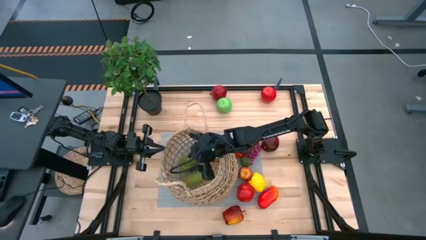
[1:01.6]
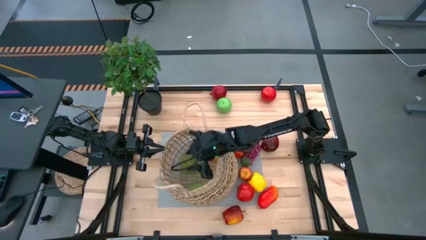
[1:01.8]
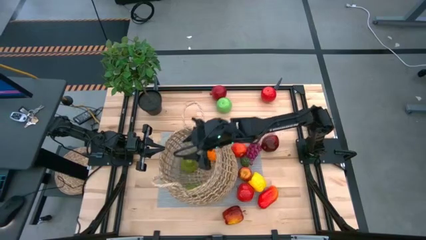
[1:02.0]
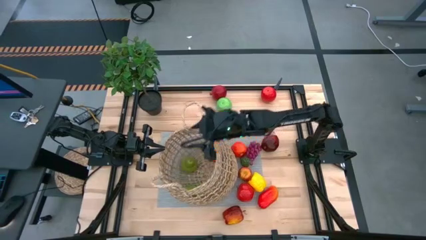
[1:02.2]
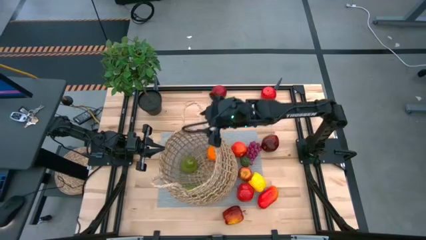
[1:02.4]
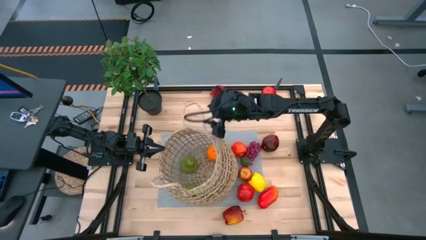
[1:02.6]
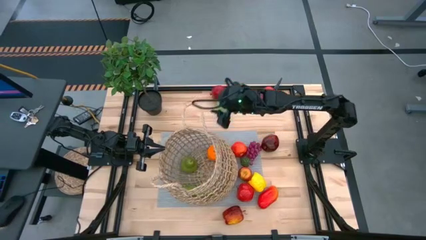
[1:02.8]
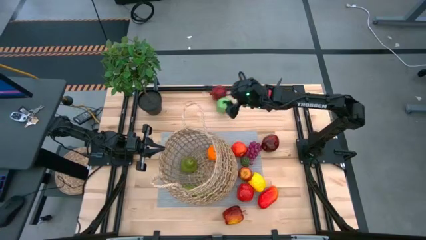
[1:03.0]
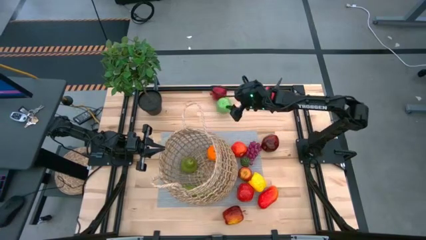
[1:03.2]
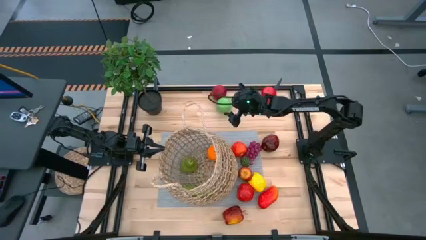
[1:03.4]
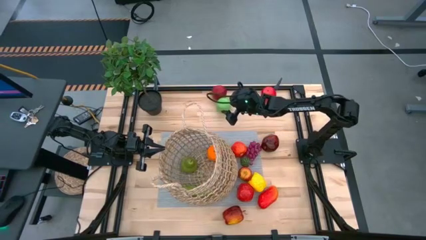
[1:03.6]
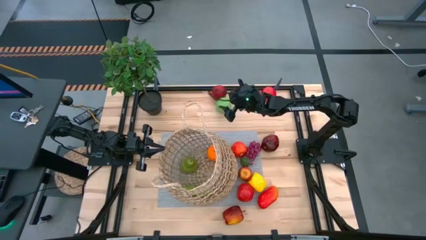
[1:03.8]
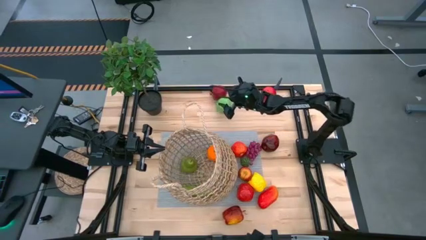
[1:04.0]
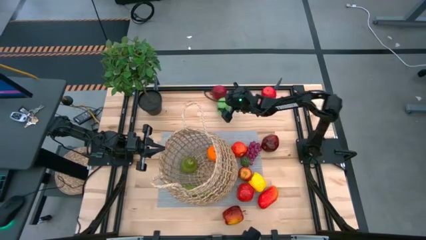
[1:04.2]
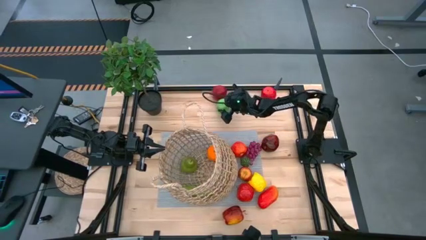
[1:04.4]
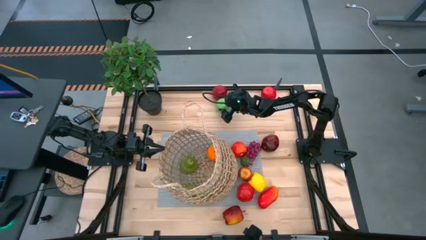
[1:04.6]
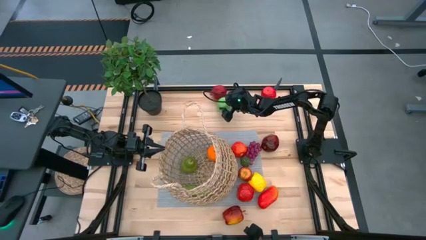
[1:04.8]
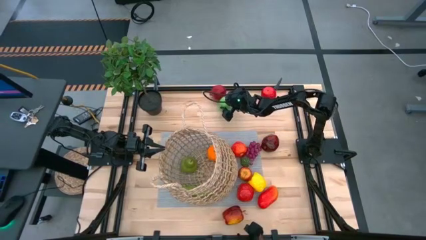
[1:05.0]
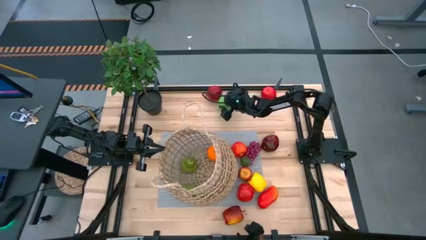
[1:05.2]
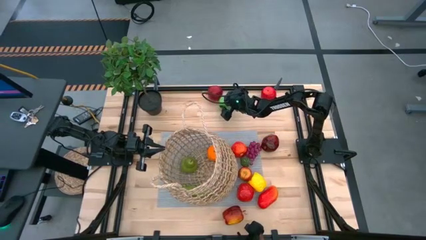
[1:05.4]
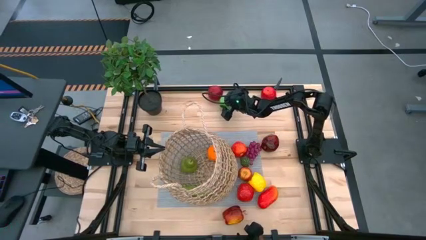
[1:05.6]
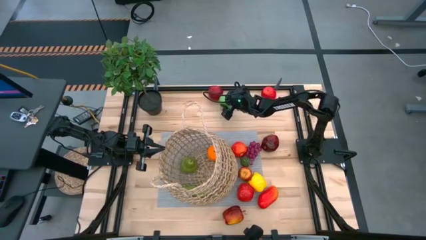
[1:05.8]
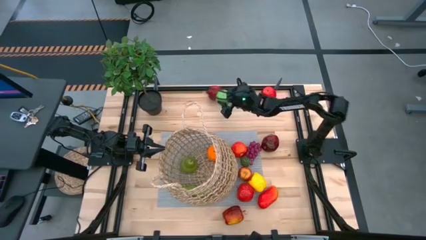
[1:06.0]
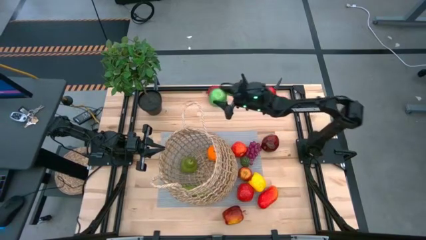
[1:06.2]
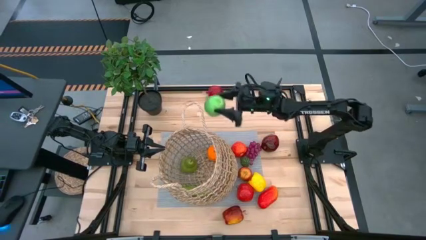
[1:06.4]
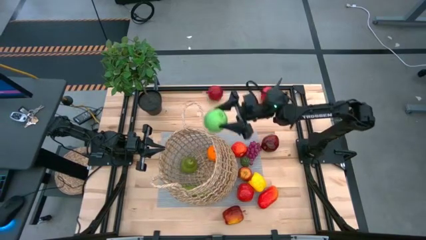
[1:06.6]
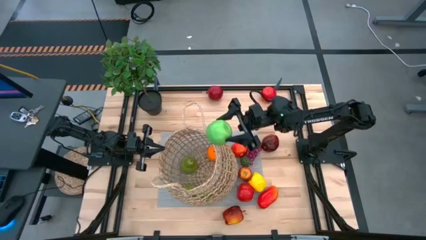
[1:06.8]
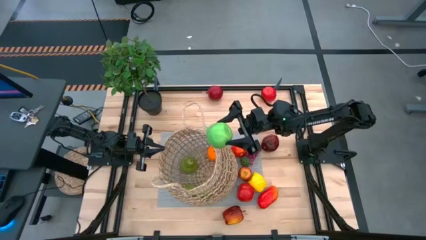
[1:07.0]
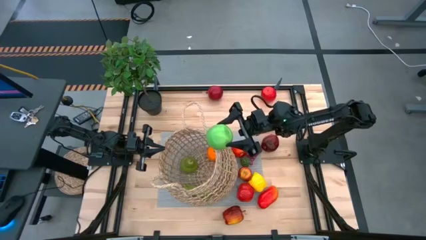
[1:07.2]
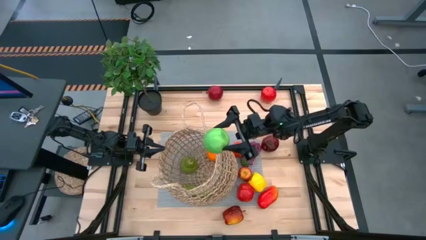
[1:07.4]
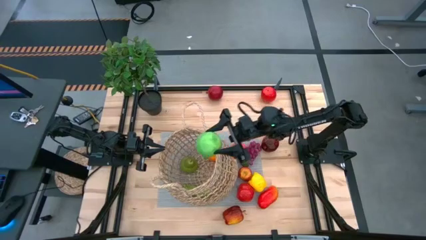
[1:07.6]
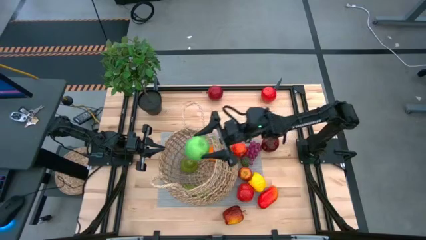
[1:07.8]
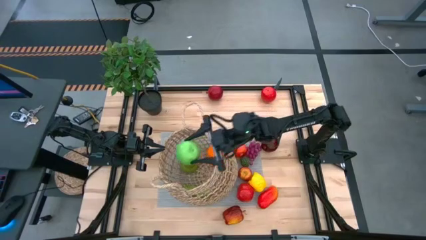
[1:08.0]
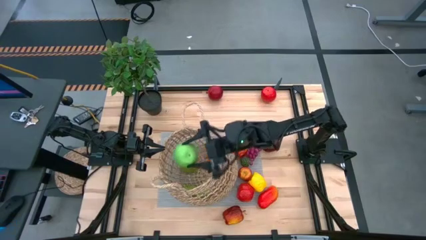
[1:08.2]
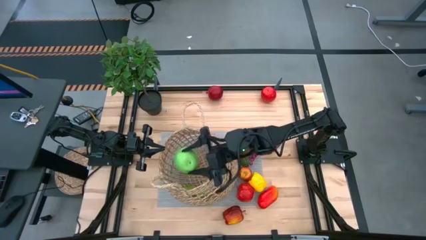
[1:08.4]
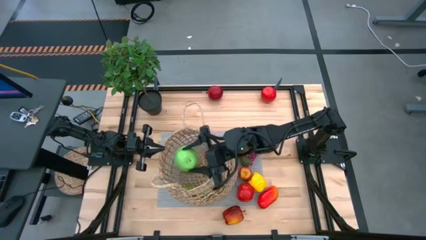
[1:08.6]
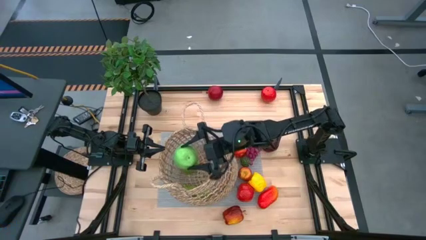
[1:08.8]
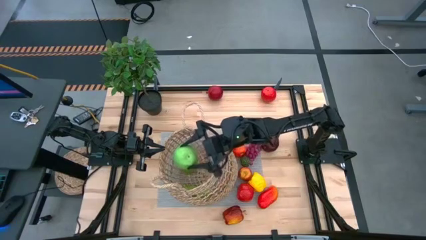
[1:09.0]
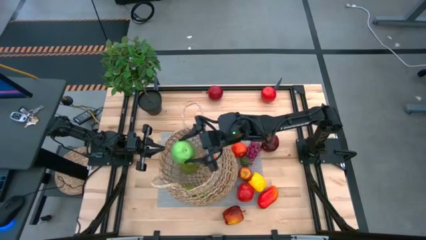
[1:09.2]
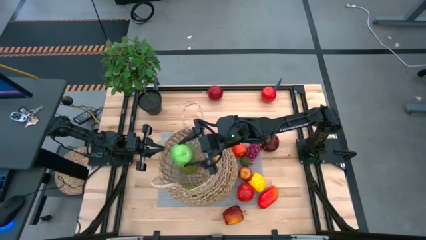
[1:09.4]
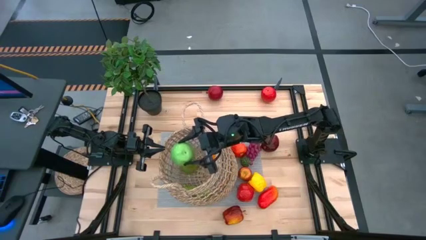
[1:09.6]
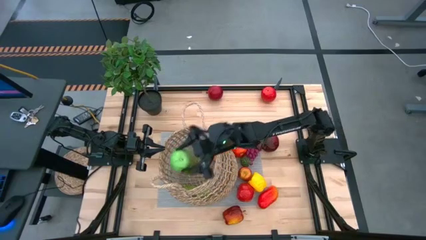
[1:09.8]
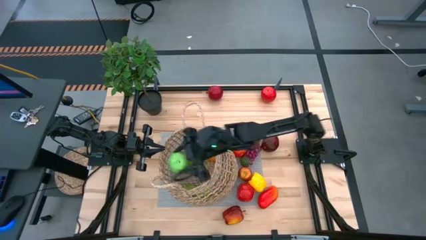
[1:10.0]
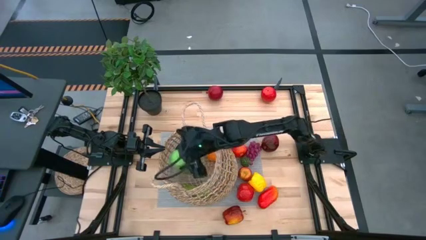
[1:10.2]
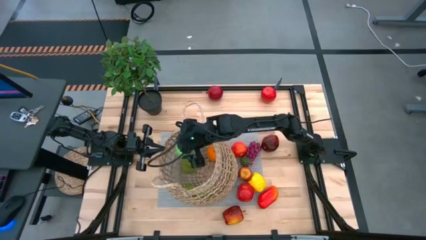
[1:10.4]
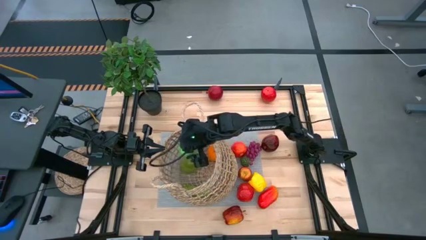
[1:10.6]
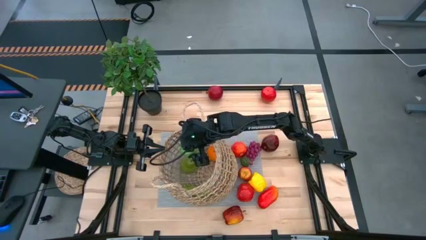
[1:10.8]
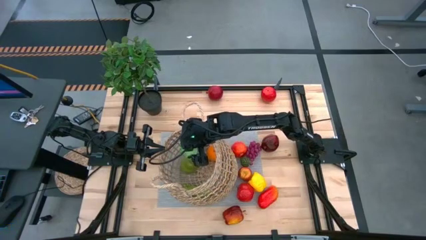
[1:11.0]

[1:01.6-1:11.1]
Task: Build produce basket
Put the green apple into the brown basket

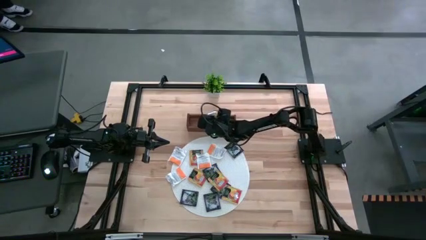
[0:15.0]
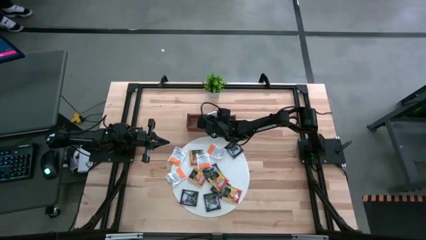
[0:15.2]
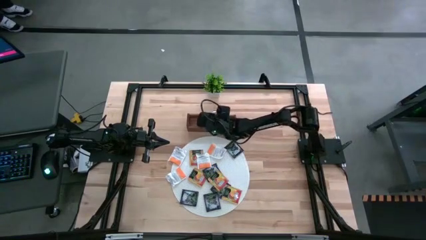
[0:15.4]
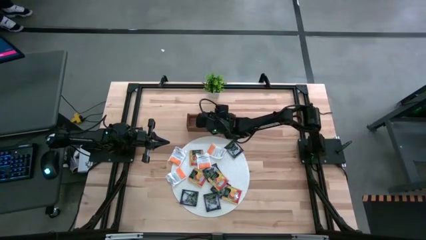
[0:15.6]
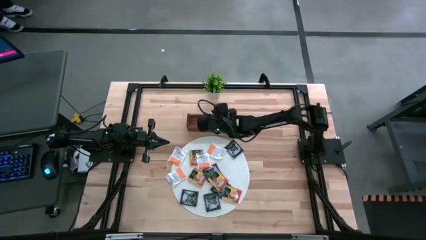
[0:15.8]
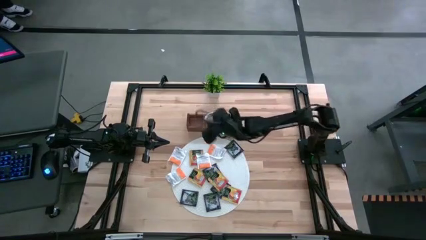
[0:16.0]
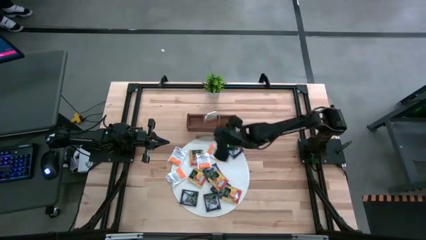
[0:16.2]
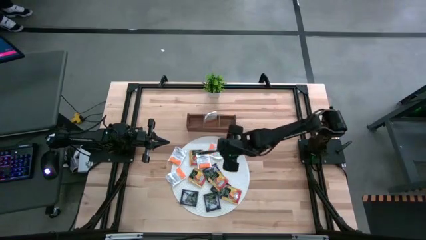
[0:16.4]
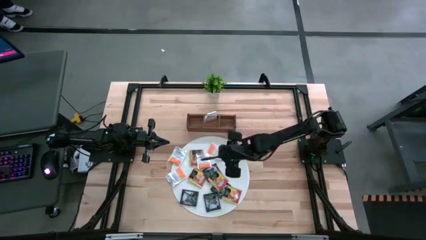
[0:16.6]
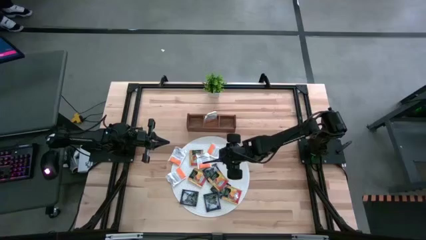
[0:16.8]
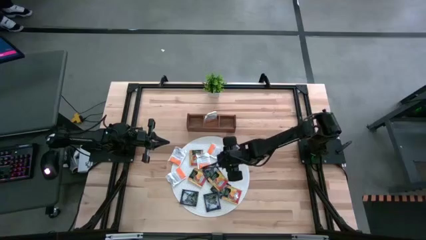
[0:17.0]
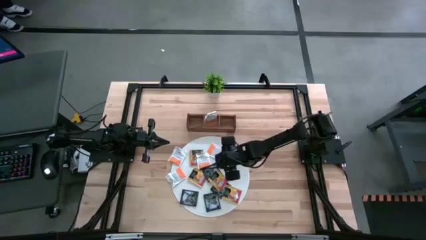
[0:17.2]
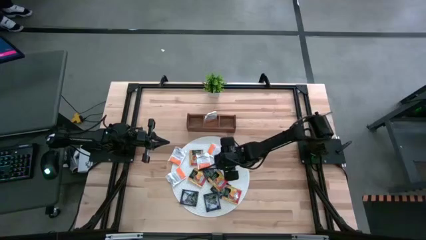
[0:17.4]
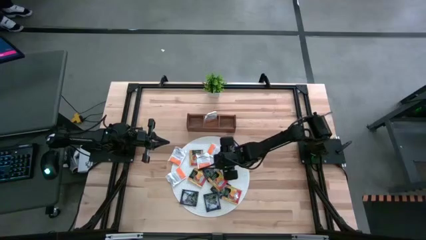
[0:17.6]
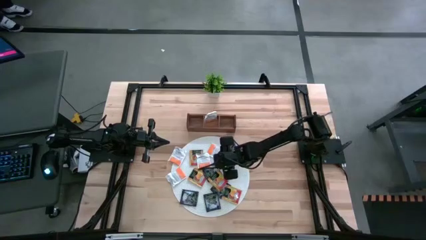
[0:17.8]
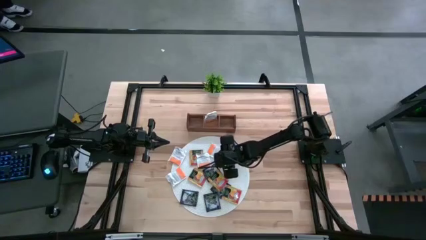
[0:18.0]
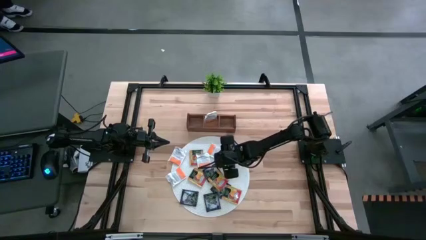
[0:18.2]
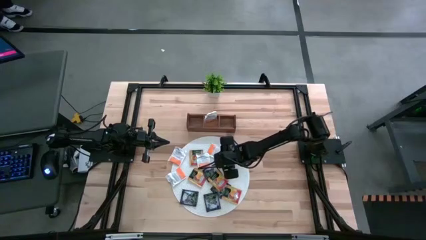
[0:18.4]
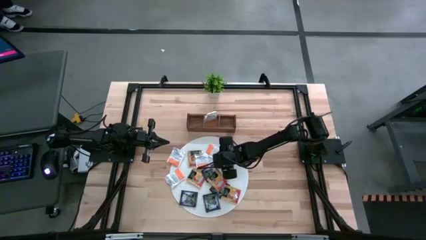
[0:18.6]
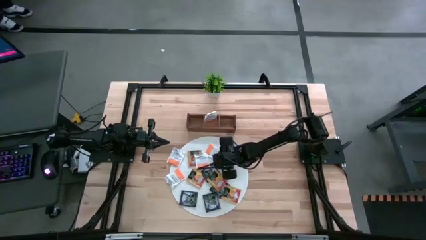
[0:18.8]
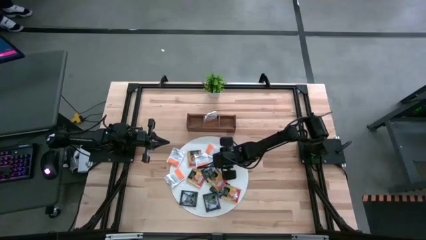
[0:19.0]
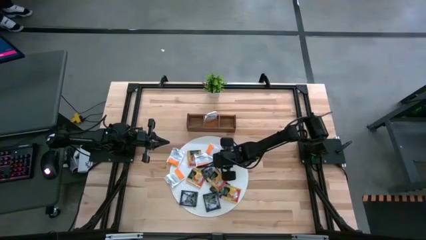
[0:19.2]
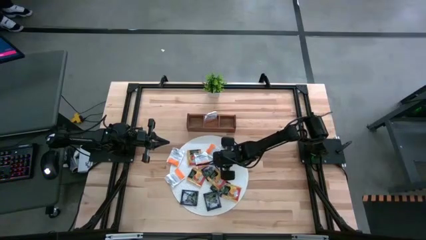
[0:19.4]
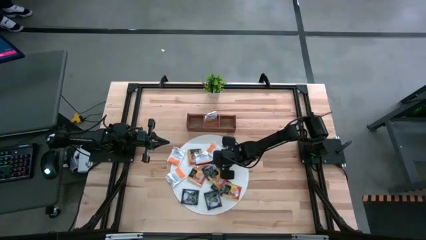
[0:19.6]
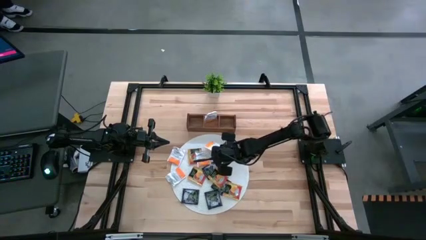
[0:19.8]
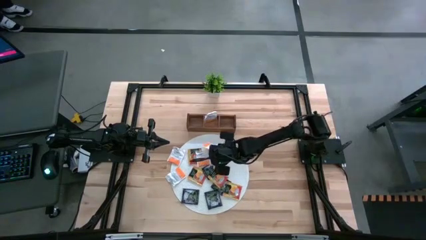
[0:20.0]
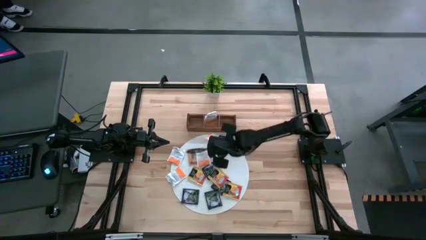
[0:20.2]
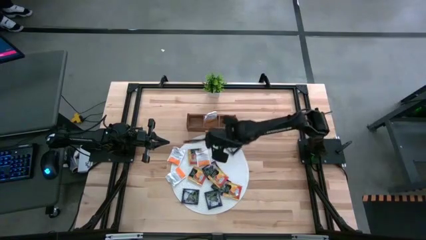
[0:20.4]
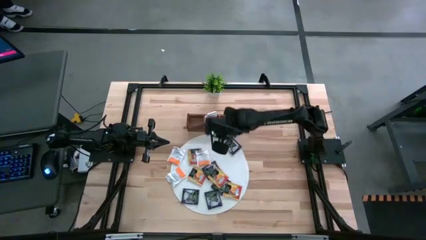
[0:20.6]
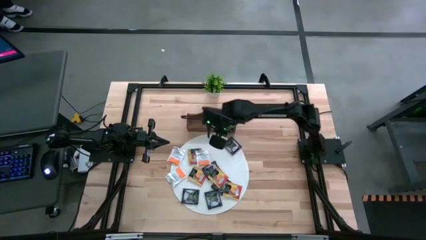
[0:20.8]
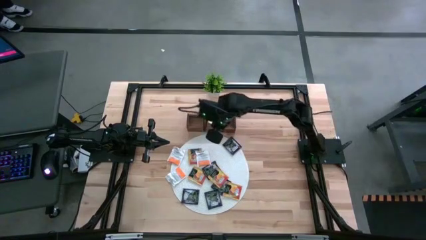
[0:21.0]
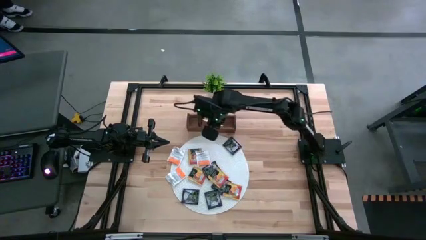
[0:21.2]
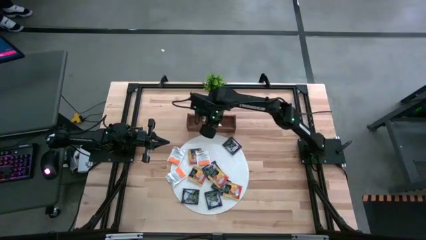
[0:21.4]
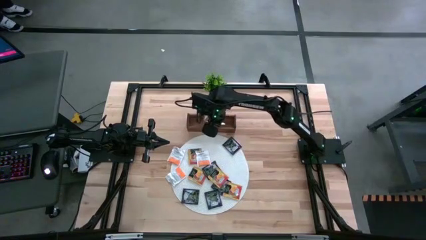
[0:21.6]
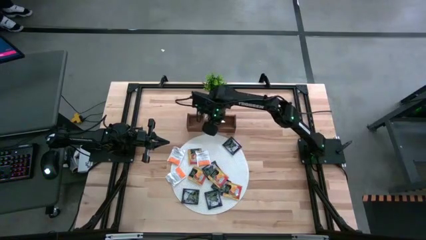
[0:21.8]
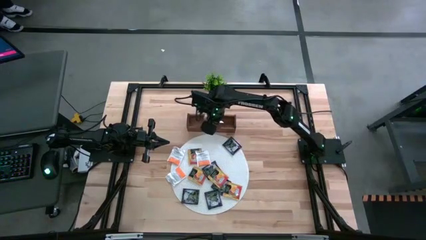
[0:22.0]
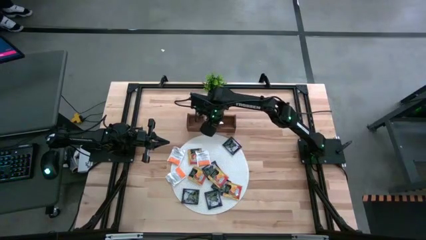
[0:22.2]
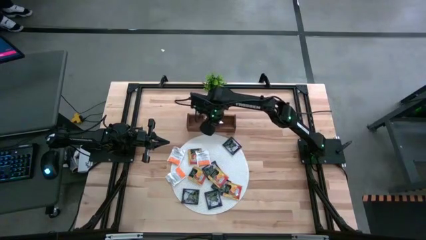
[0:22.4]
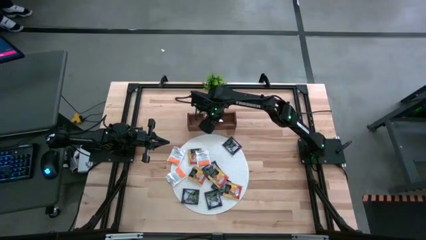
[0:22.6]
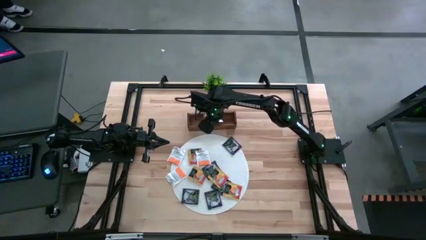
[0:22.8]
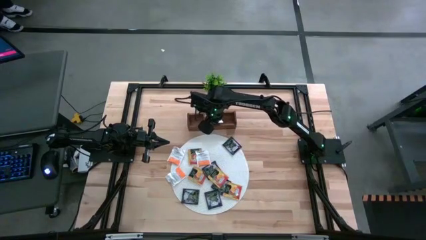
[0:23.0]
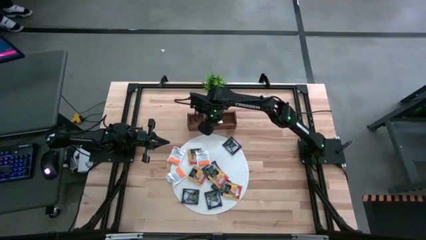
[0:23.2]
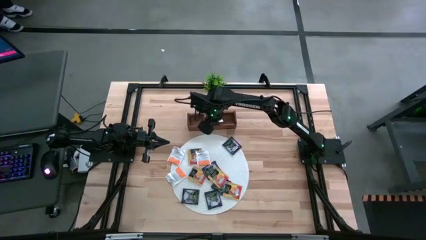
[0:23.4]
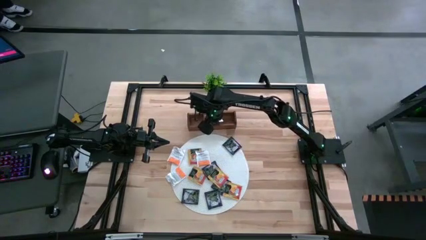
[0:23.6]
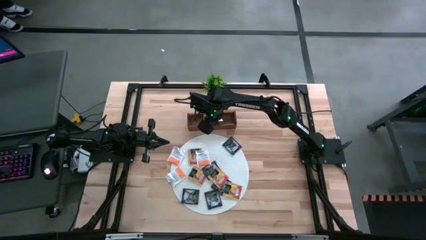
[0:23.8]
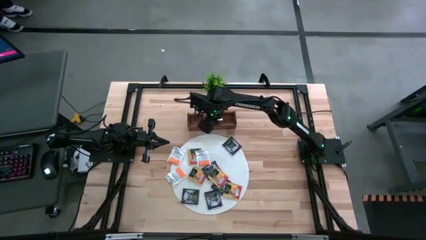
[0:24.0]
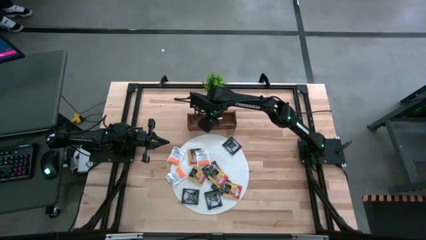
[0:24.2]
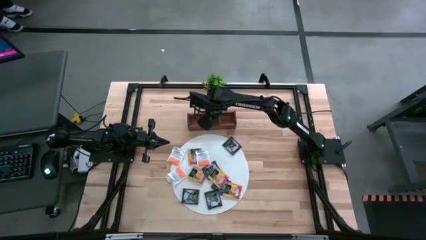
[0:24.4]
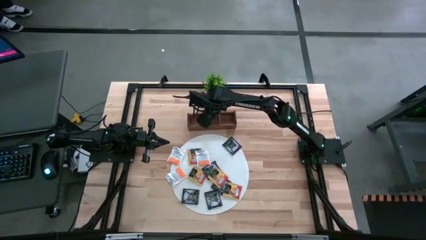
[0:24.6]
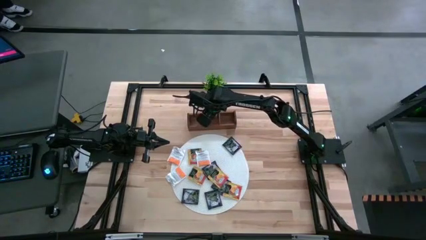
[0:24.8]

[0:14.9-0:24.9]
Task: Pick & Place Tea
Put the orange tea bag into the middle section of the wooden organizer
